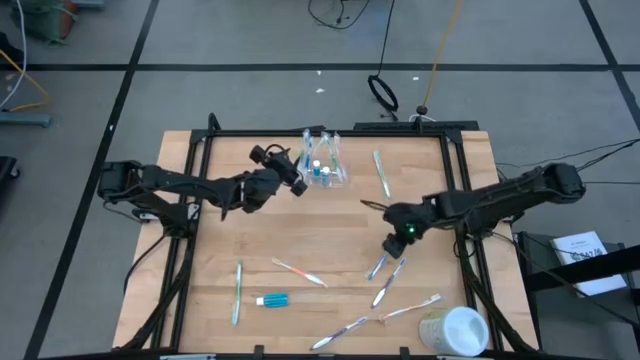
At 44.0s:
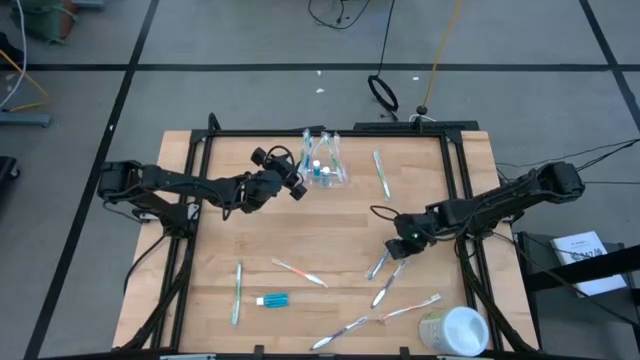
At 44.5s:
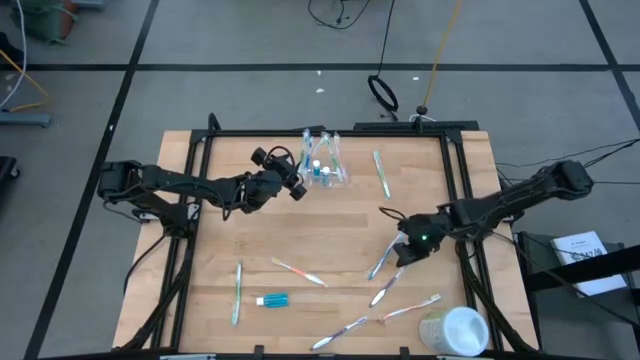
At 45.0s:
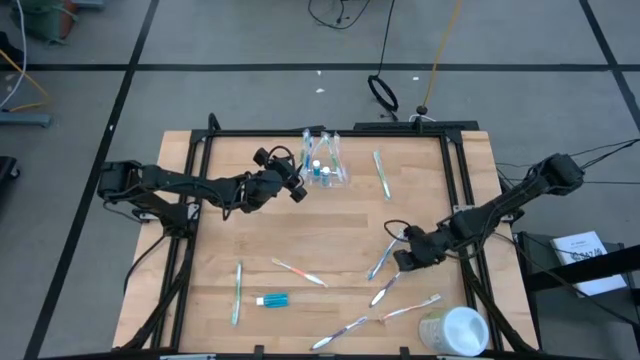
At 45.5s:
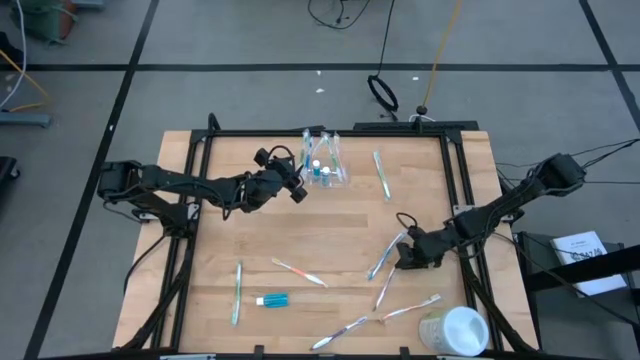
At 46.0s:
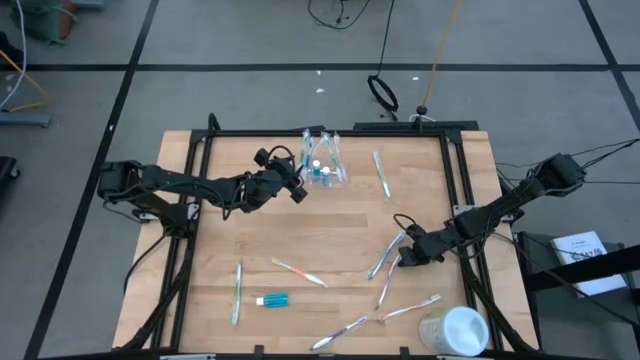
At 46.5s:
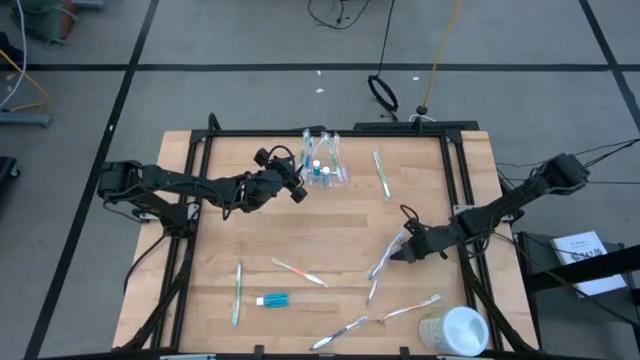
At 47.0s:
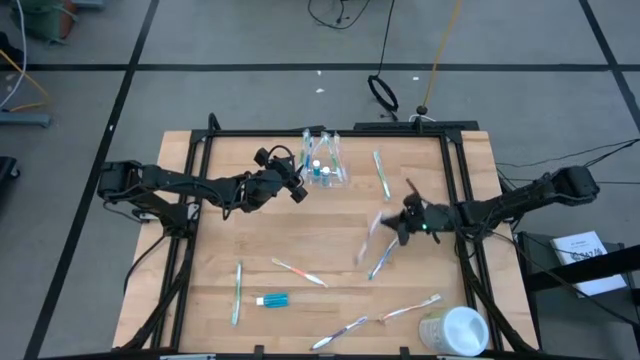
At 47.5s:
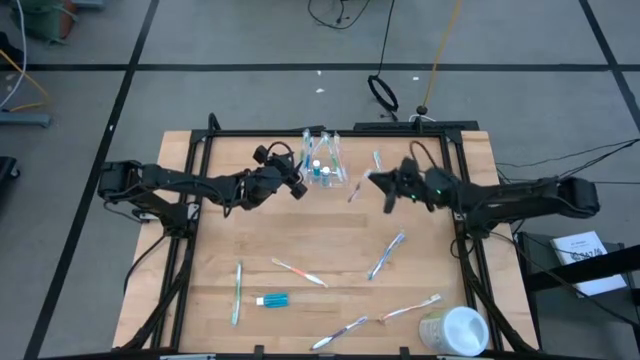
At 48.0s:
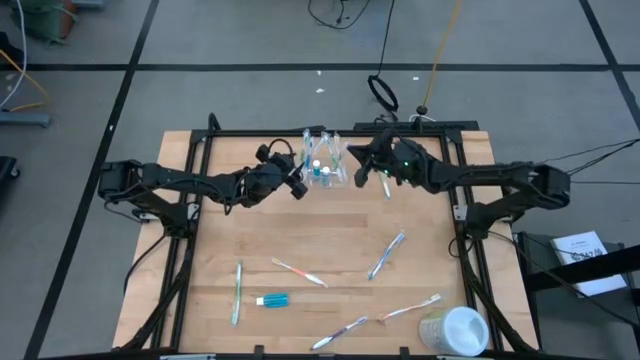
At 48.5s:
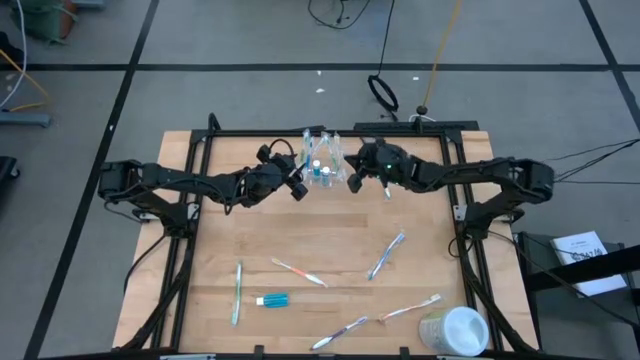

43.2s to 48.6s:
Task: Pick & Place toothbrushing station
Put the violet toothbrush into the transparent organizer

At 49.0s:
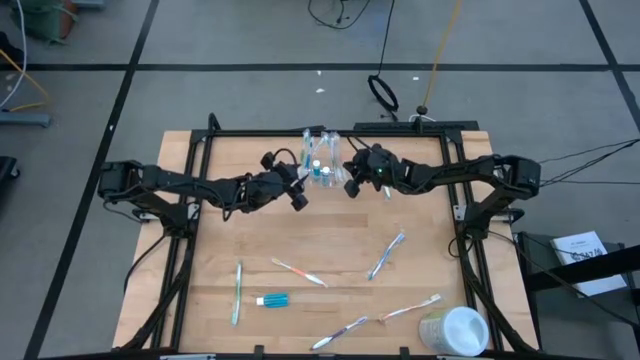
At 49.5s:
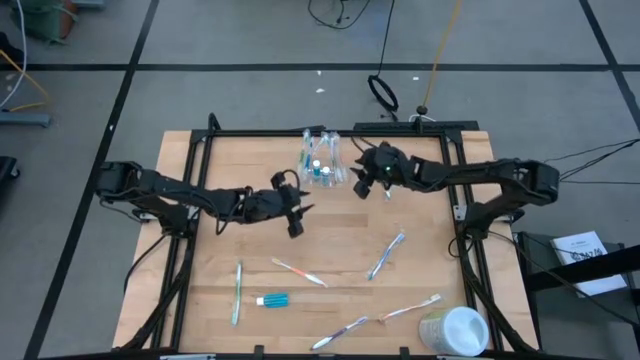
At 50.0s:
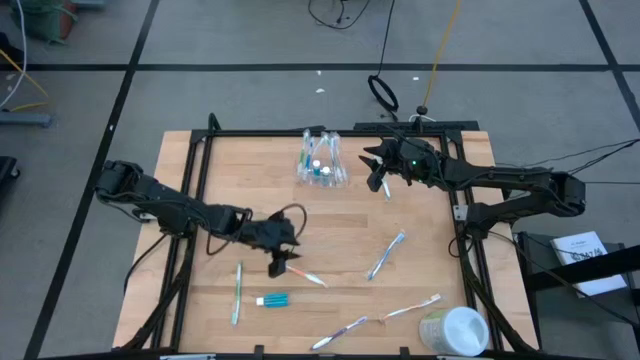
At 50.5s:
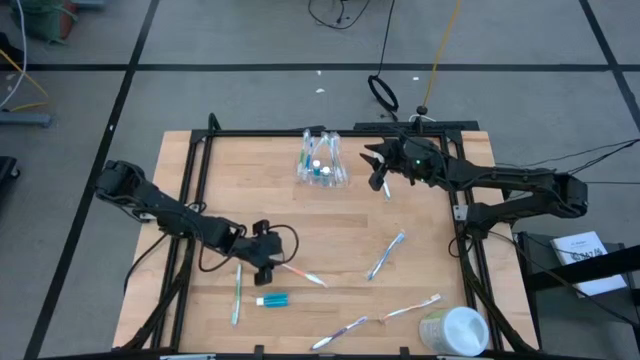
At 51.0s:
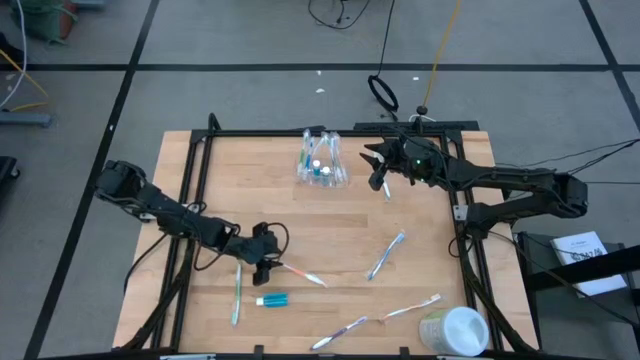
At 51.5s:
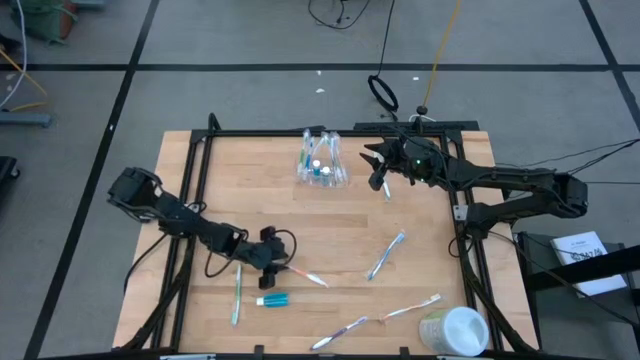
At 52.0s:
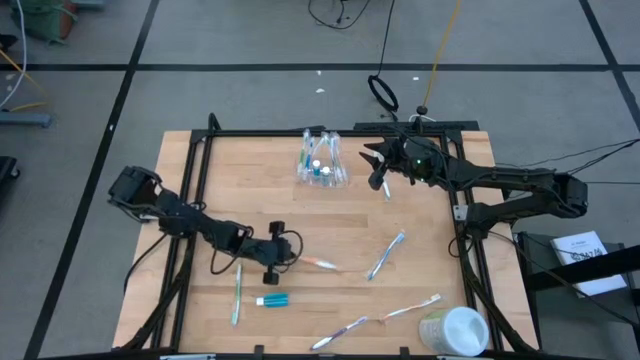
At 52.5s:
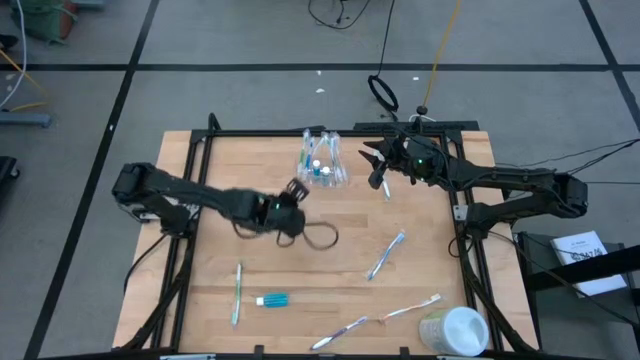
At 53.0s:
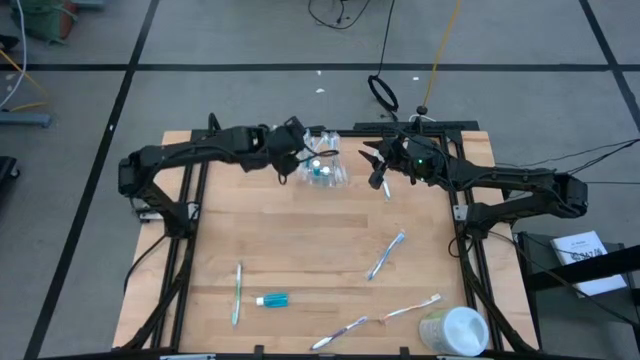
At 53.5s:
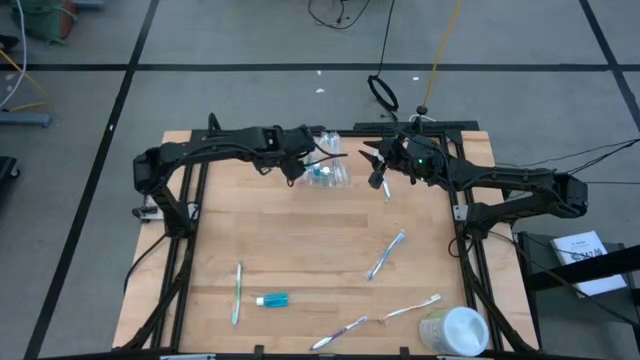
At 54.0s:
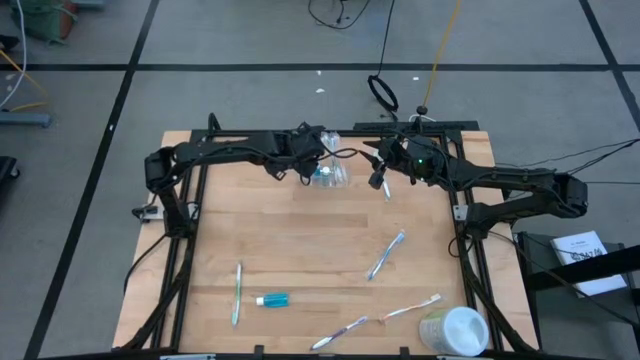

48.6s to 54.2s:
Put the orange toothbrush into the transparent organizer

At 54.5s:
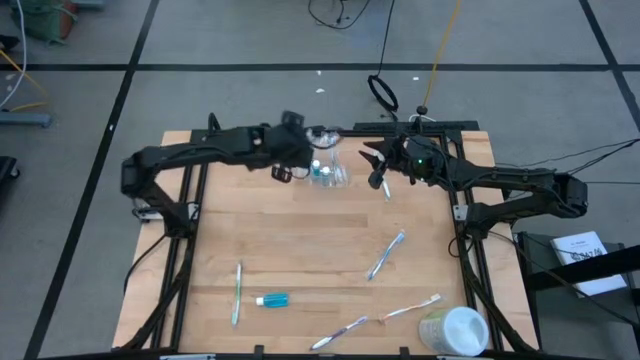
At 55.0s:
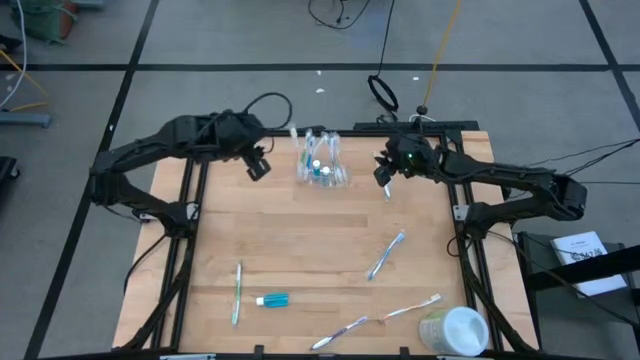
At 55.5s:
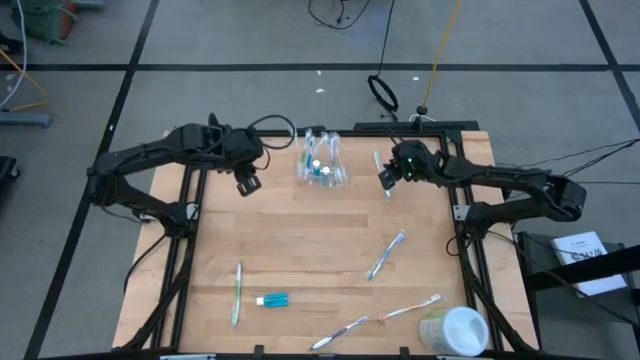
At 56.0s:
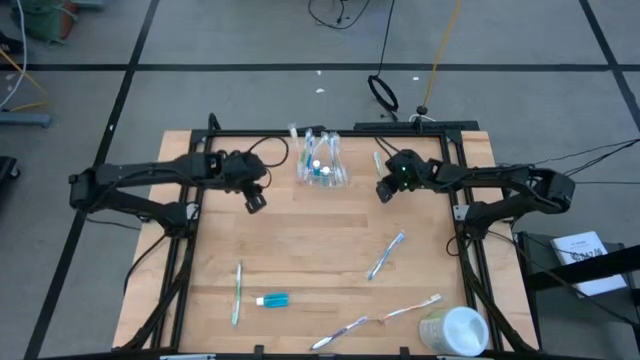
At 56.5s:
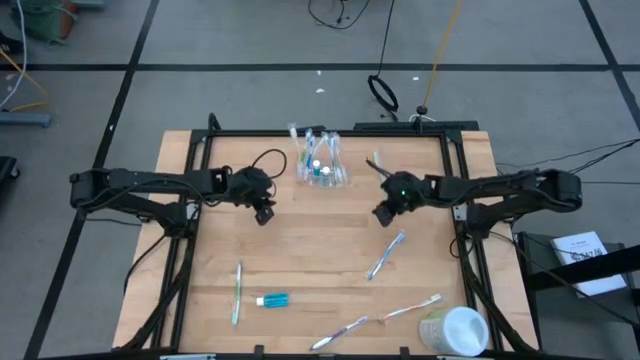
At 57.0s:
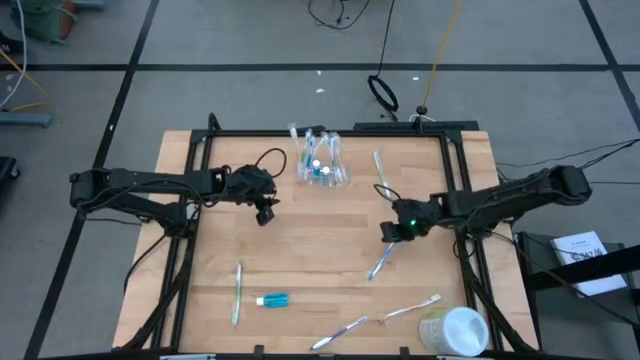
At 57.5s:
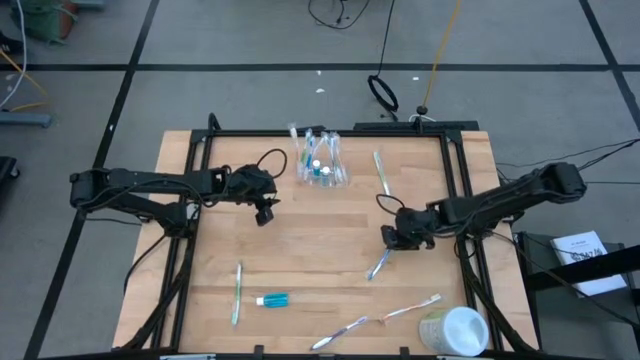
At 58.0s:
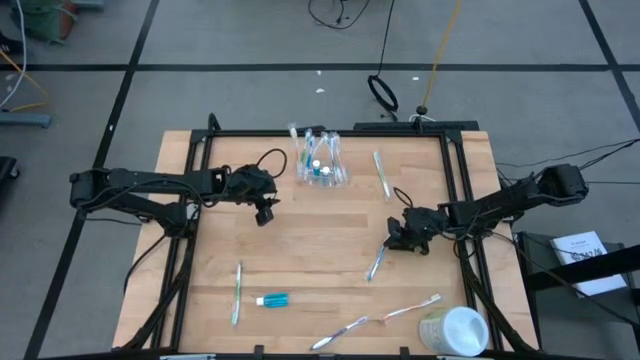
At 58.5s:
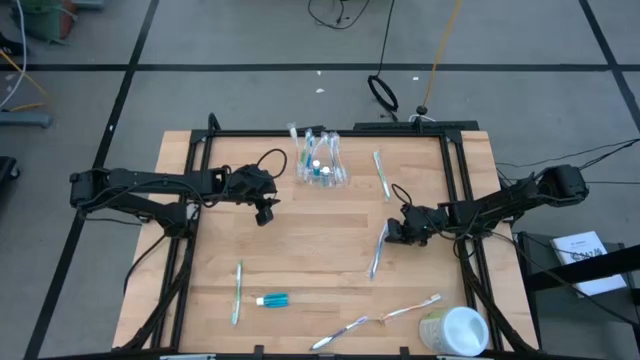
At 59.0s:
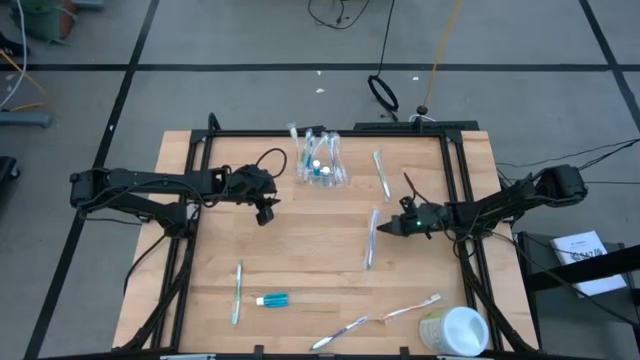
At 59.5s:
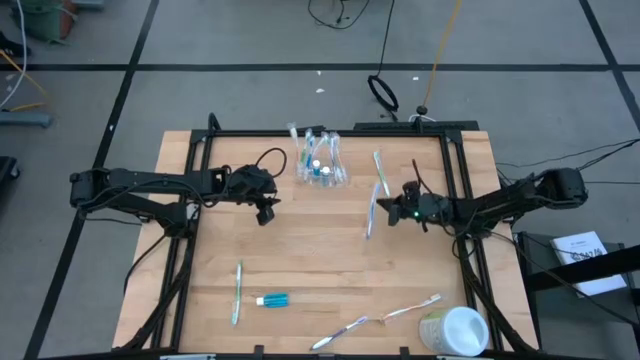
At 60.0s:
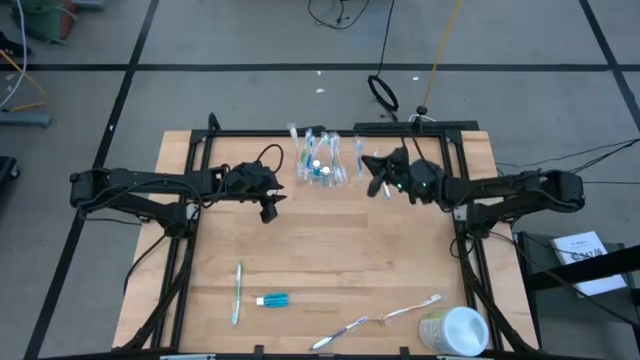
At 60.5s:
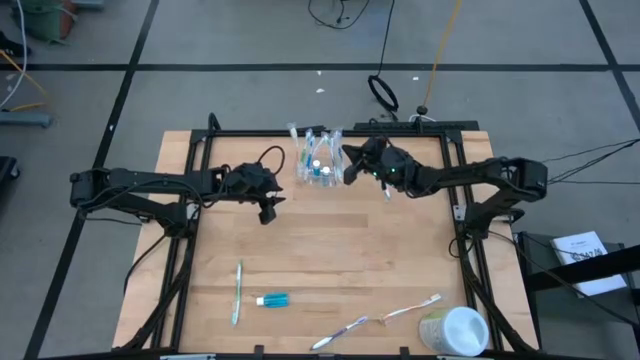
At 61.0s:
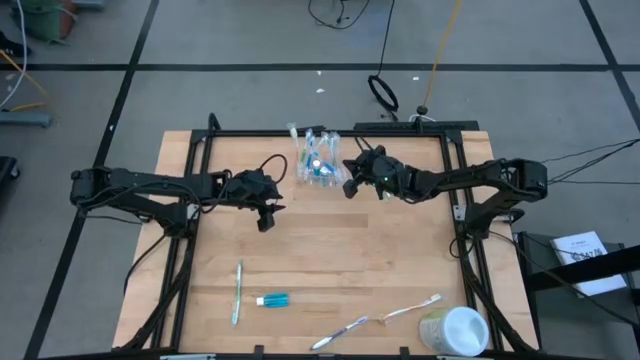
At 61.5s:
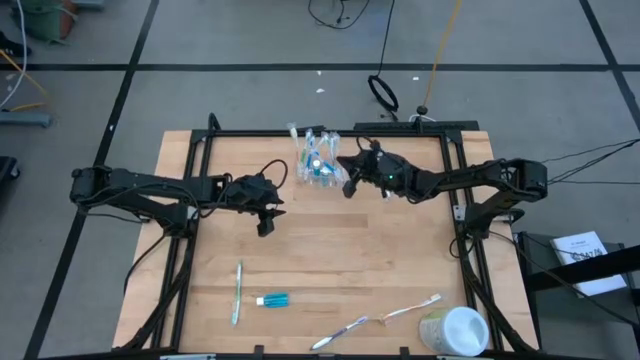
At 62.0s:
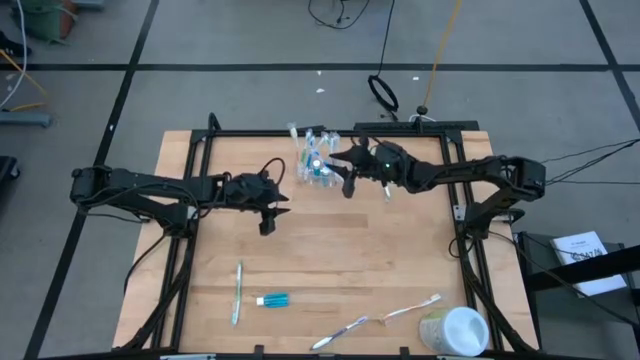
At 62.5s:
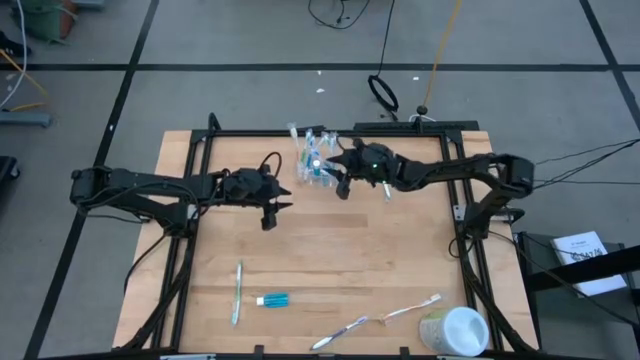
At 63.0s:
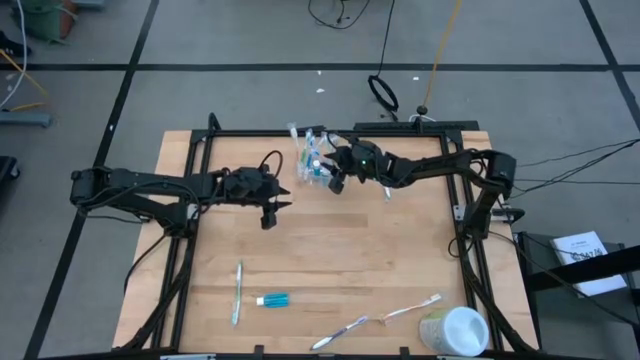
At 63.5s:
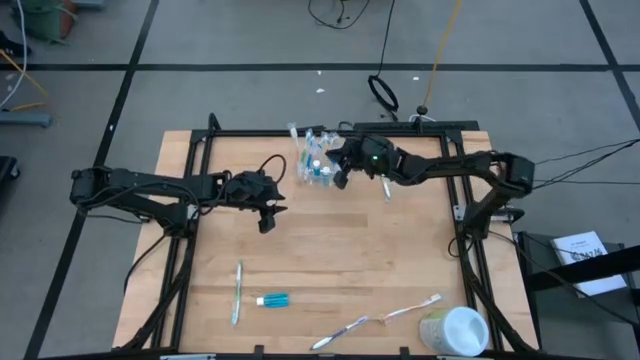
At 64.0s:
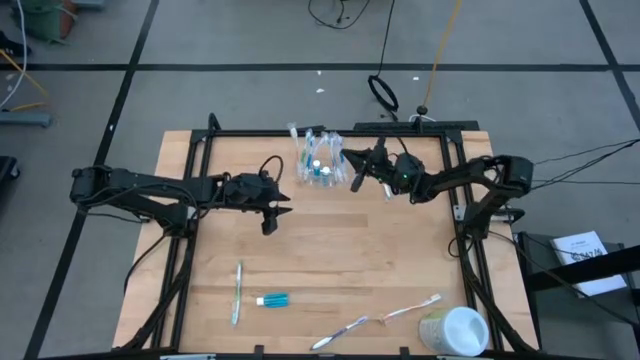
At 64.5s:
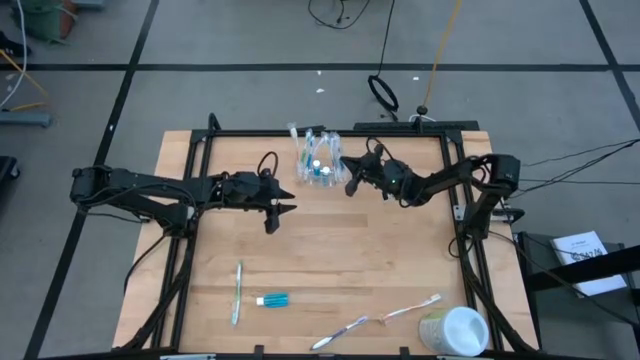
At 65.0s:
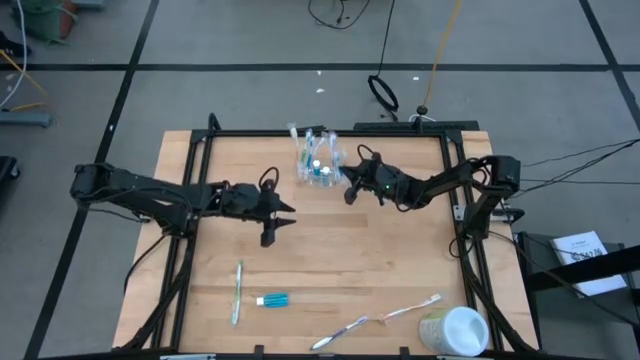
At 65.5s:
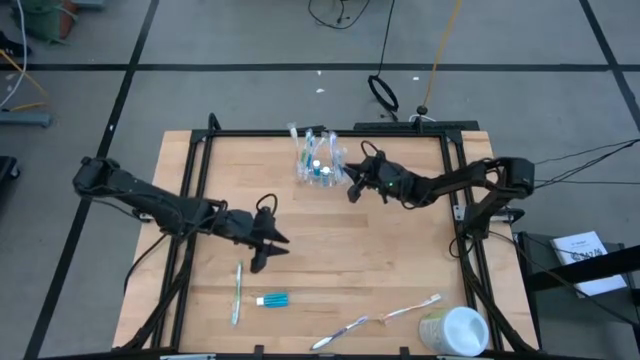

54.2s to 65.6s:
Put the blue toothbrush into the transparent organizer
